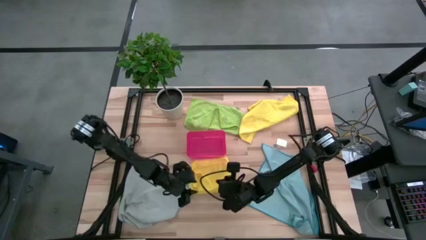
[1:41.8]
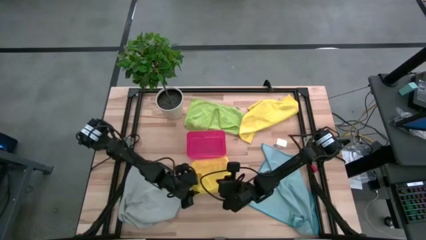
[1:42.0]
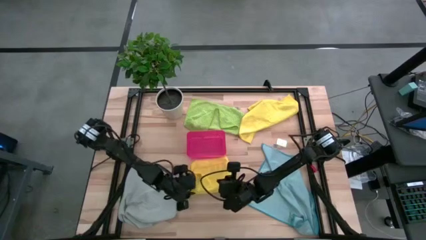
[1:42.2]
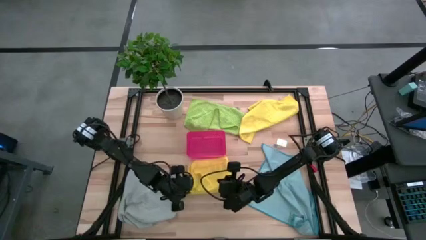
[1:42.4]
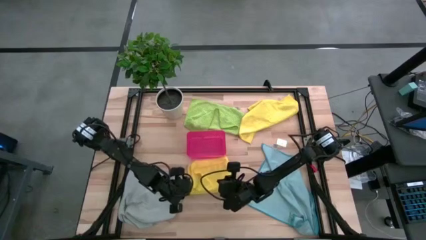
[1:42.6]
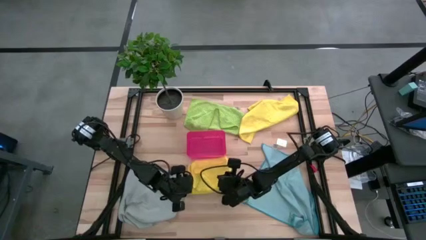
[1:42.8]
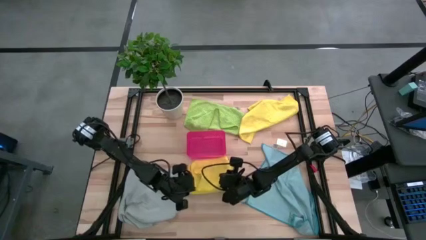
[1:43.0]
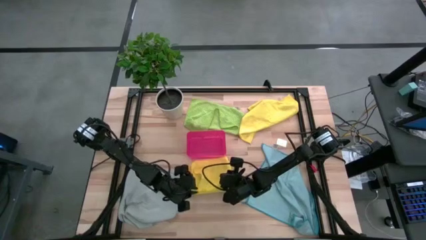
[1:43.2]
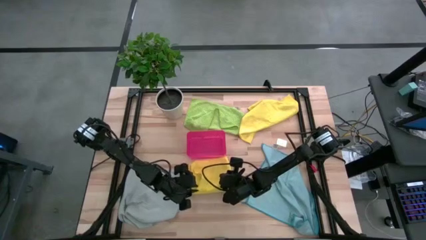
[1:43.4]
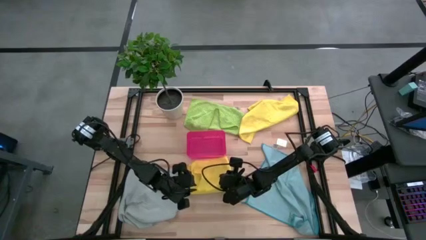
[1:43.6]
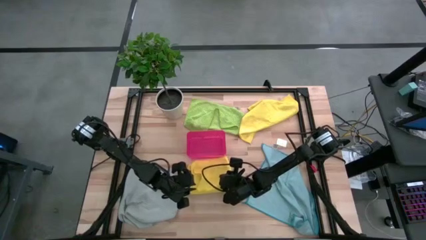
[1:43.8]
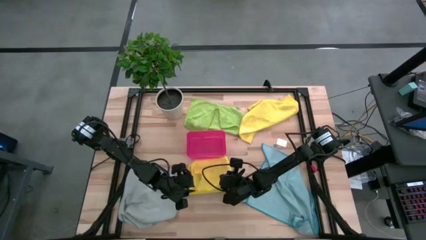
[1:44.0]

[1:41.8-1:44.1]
Task: Fold microfiber towels
Fold the bottom yellow microfiber cloth

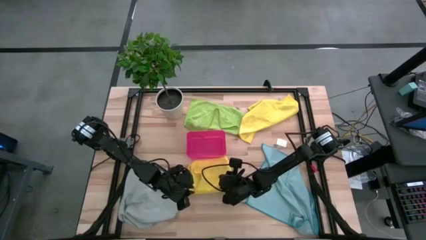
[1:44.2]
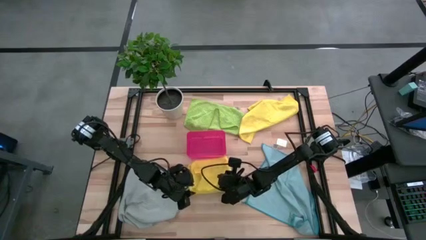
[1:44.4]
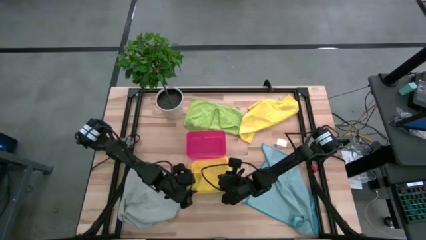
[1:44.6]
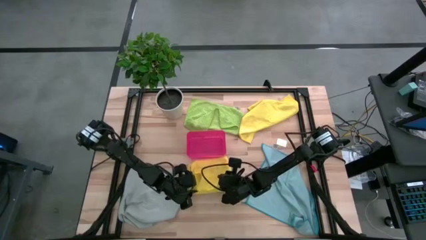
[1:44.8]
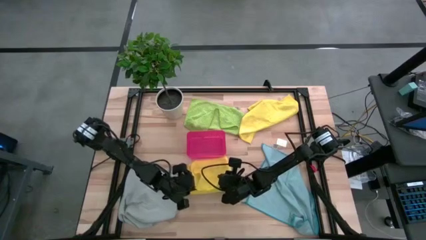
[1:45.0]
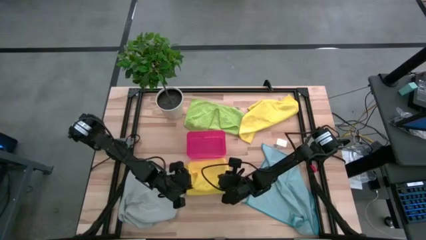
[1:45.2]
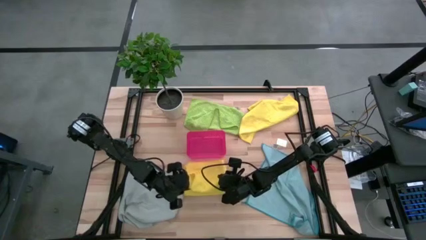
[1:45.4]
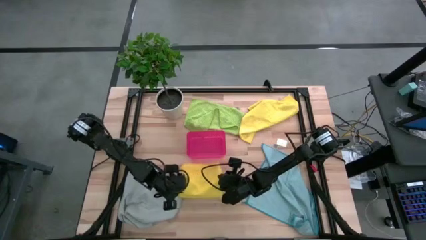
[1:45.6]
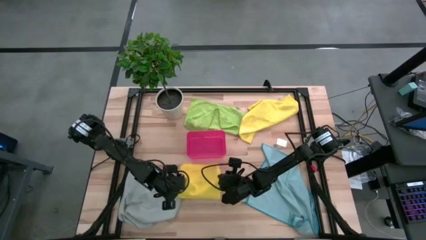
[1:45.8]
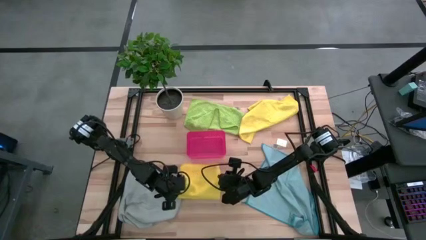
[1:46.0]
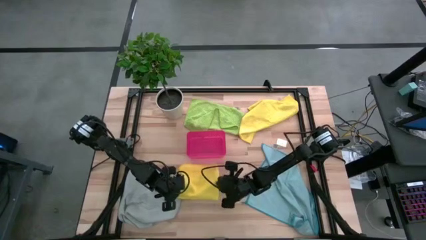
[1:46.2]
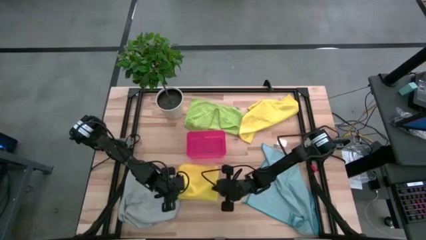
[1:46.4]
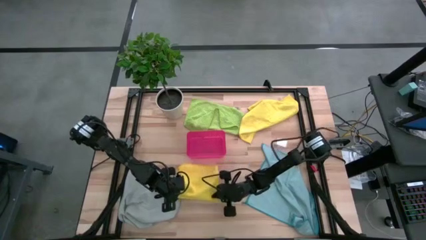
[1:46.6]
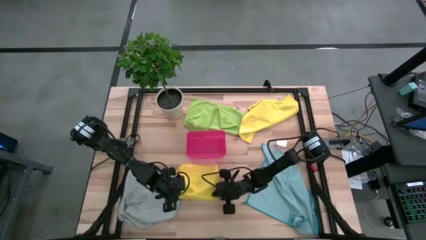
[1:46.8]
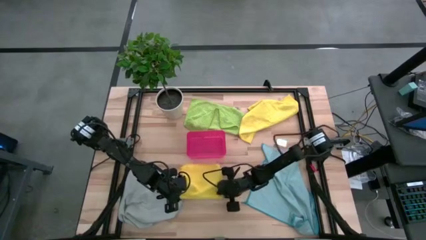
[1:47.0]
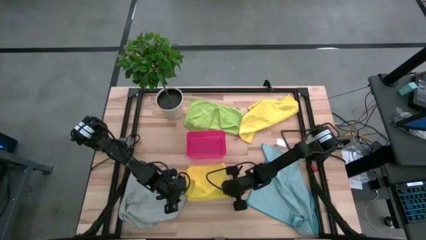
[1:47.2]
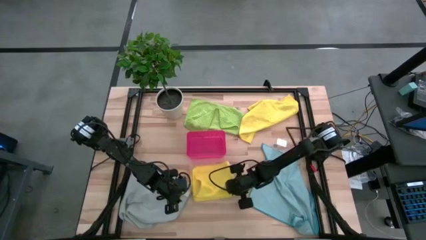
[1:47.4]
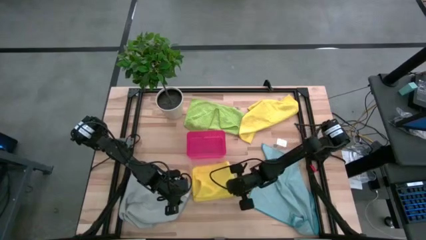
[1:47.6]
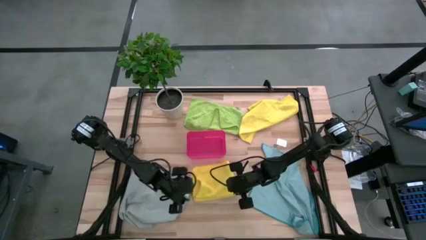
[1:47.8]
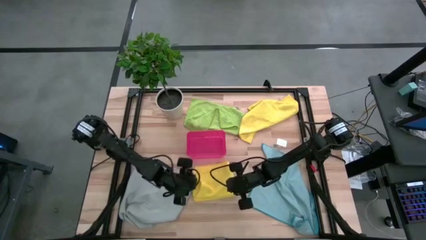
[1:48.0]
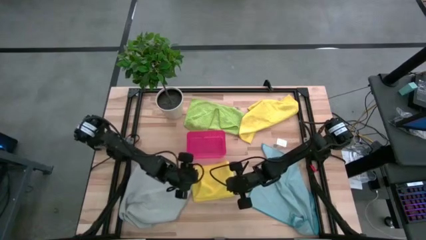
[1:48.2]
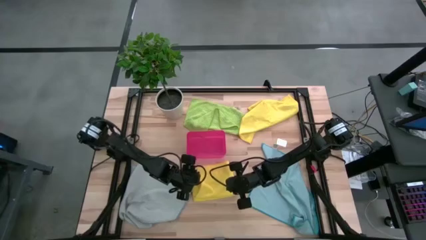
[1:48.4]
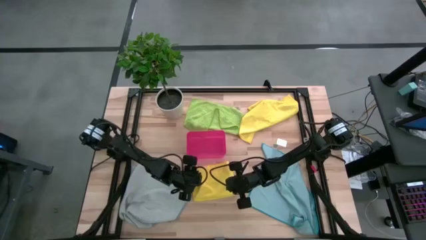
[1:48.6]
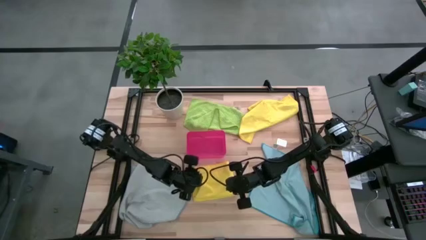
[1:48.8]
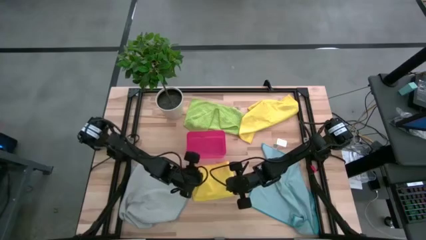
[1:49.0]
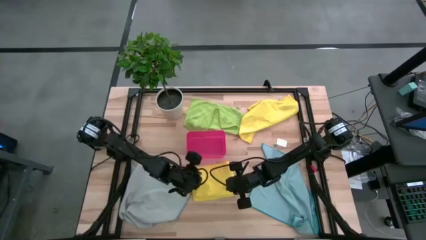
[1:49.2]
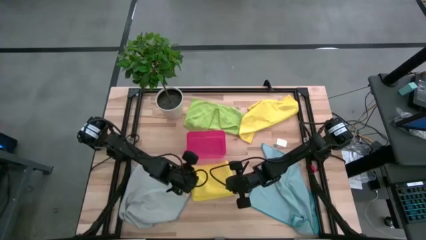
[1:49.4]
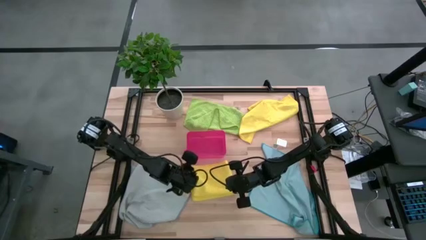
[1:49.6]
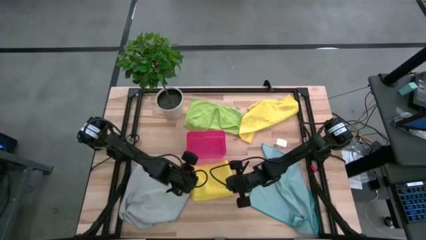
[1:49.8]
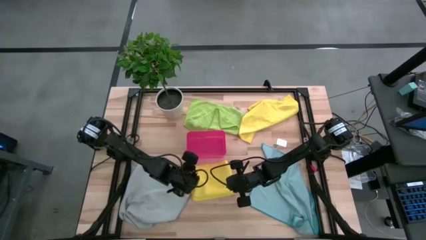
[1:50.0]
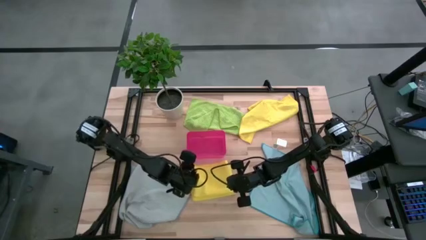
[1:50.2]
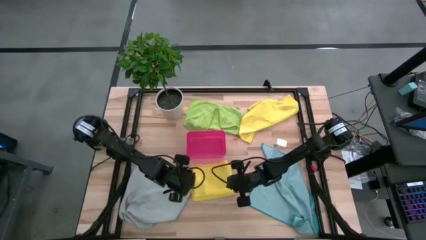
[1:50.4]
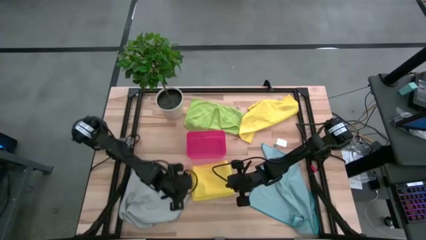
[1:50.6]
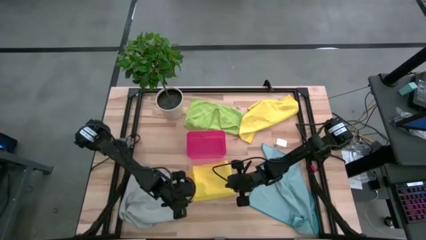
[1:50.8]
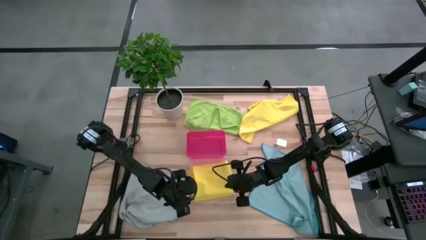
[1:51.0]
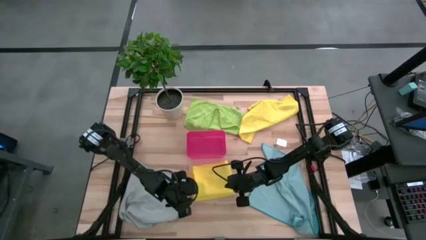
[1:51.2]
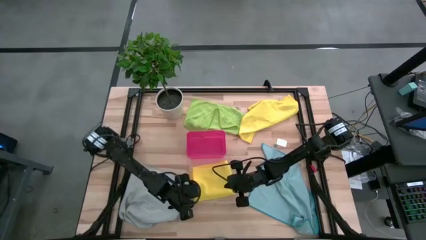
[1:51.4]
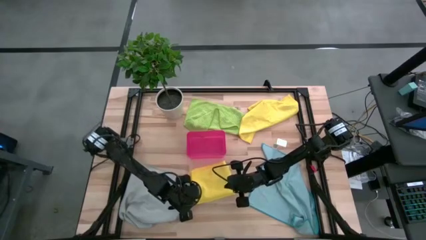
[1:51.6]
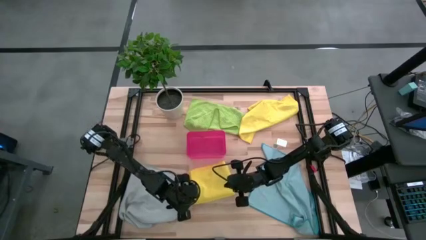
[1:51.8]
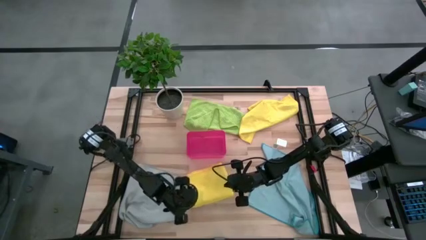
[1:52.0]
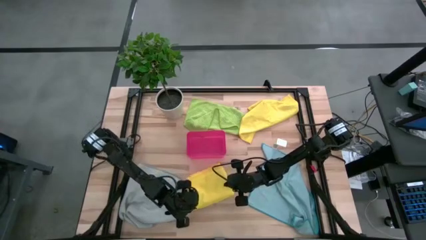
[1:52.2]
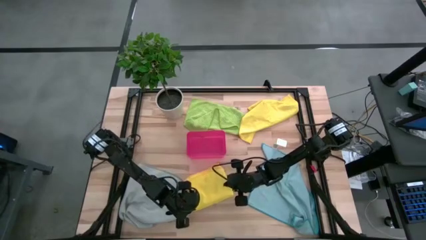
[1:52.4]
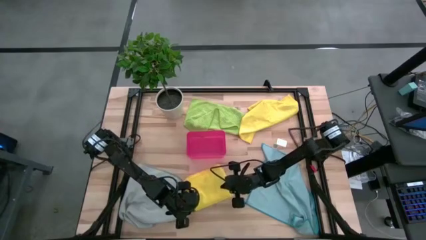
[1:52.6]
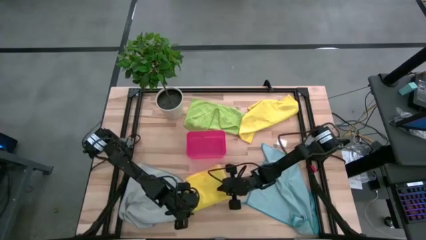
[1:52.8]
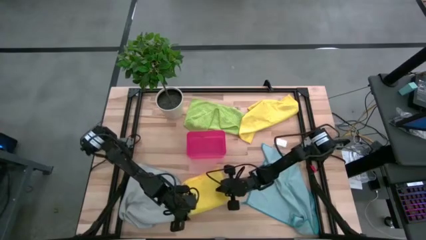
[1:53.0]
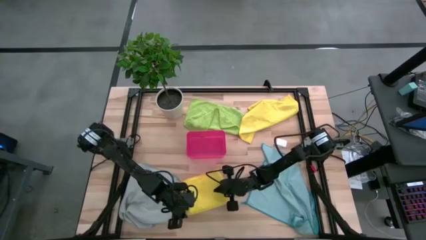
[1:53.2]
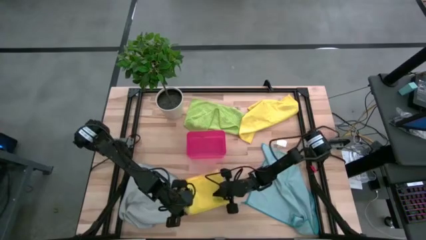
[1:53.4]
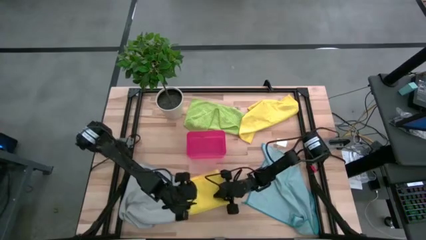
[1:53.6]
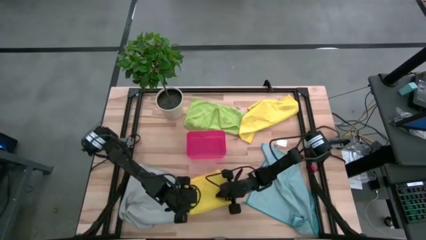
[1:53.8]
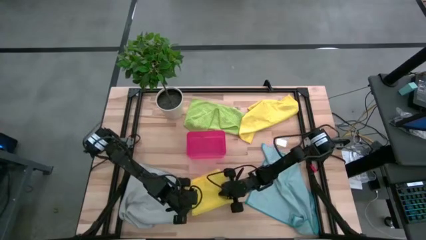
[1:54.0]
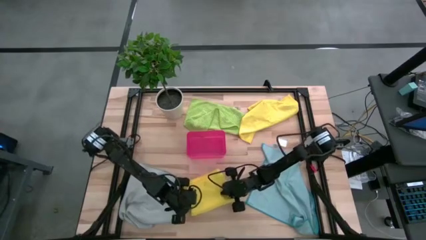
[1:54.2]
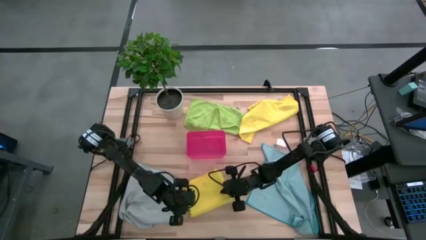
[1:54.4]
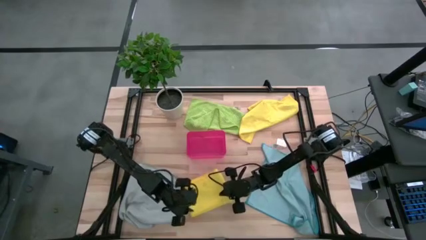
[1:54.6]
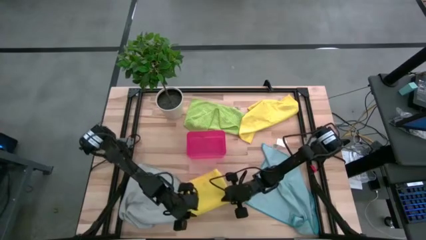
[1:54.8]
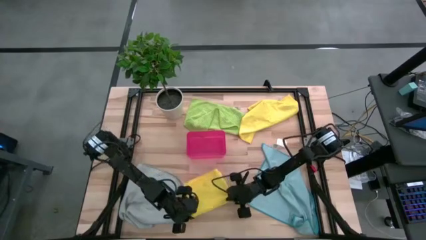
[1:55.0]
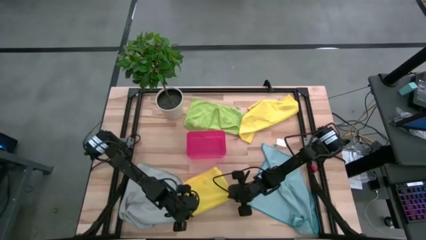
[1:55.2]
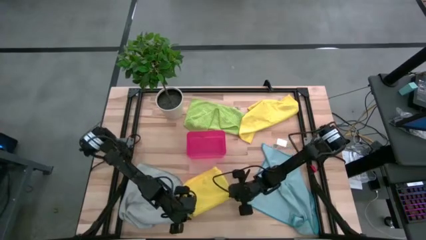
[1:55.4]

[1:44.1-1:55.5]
Fold the bottom yellow microfiber cloth

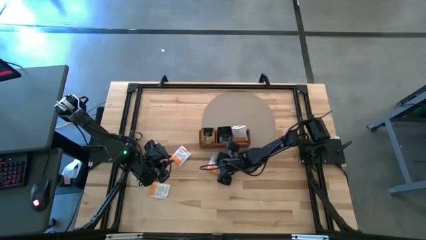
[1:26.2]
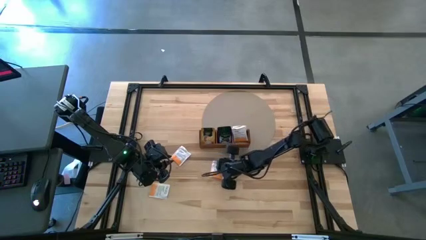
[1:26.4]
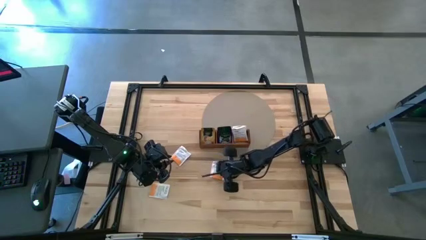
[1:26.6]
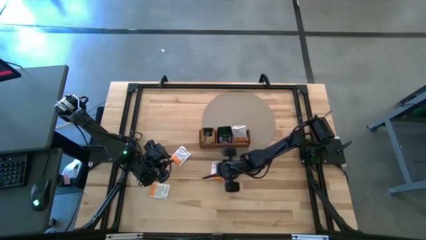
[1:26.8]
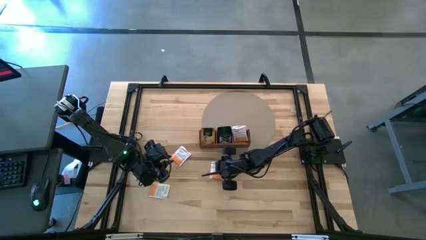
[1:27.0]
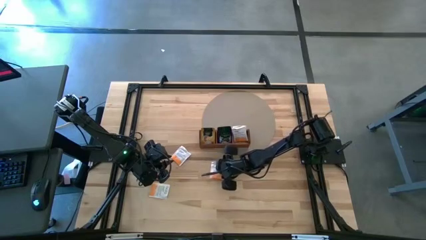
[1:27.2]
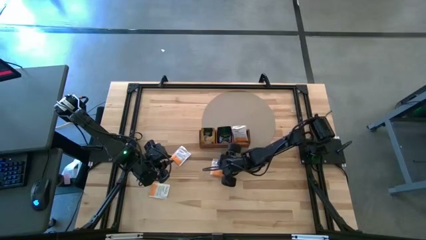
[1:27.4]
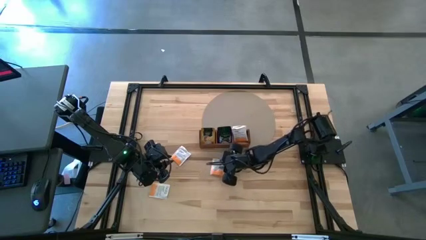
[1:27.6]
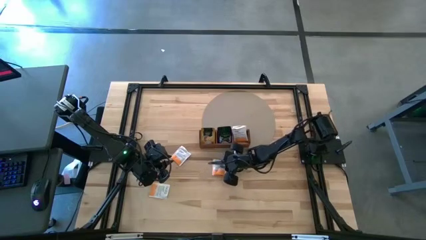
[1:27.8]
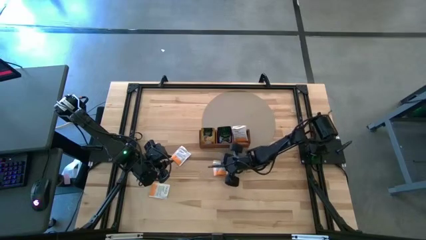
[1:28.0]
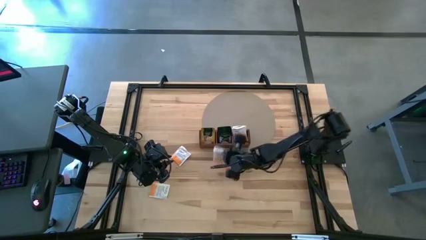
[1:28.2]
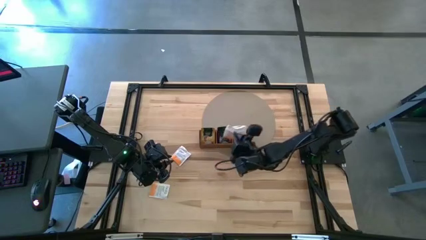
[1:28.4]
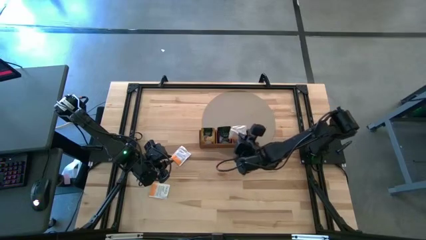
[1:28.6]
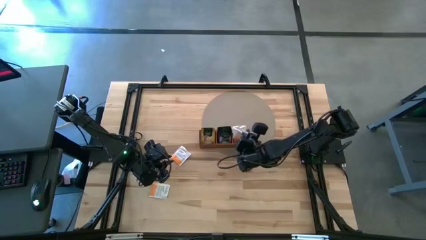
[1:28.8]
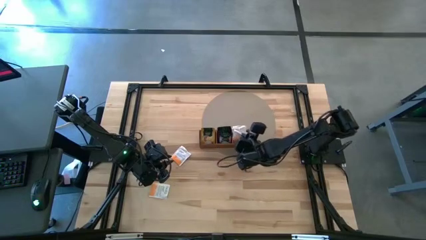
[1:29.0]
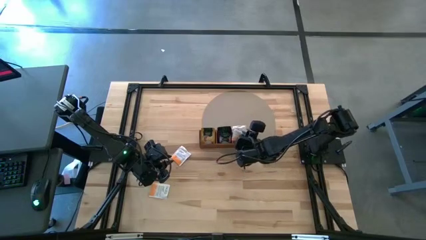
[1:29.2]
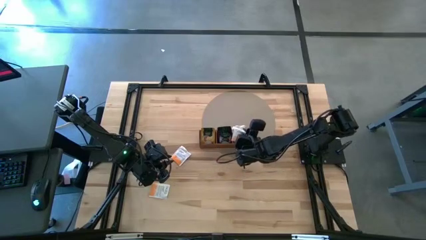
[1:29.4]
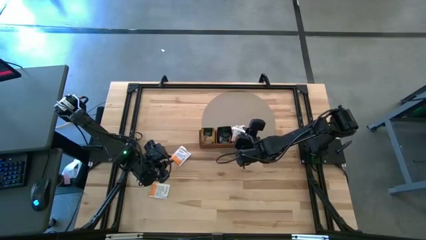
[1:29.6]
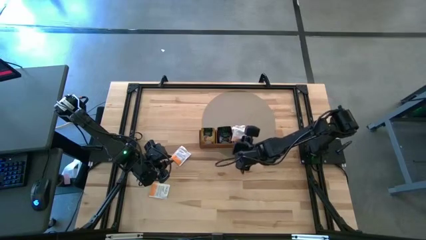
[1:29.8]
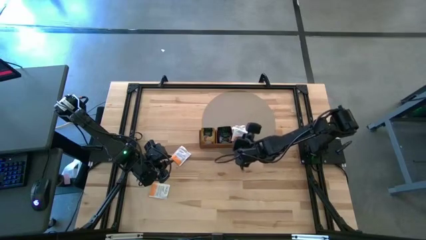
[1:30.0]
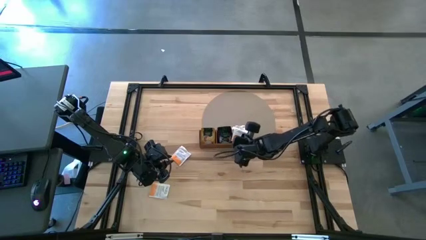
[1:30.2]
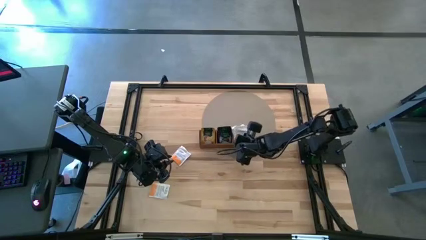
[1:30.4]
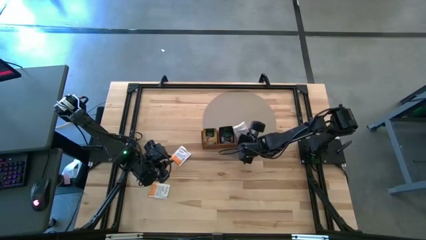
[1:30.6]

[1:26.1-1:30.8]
Task: Pick & Place Tea
Put the white tea bag into the right section of the wooden organizer
